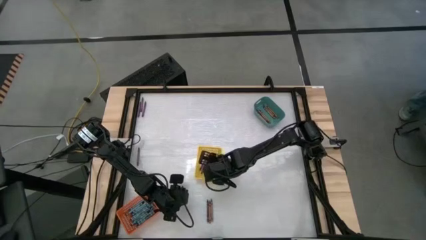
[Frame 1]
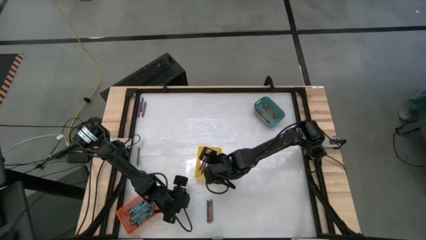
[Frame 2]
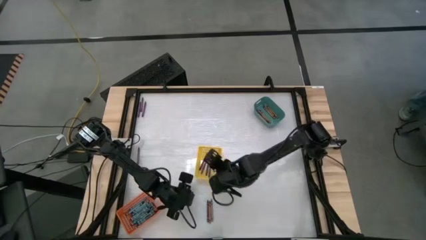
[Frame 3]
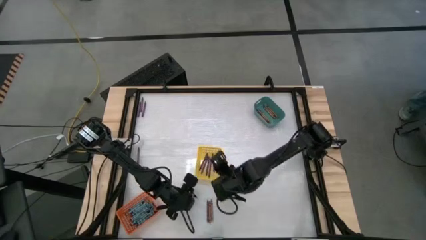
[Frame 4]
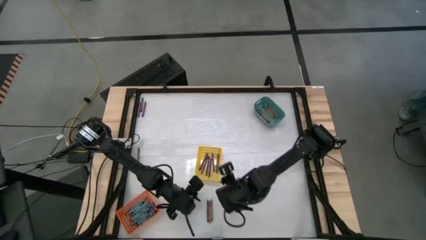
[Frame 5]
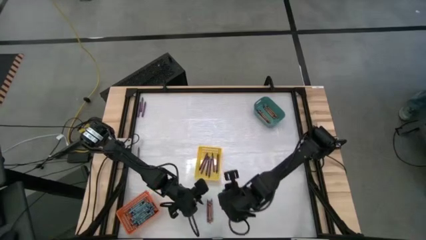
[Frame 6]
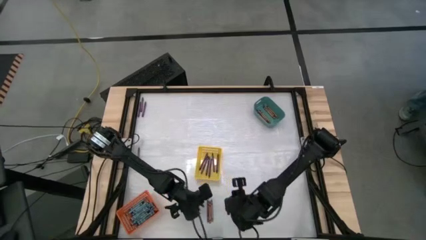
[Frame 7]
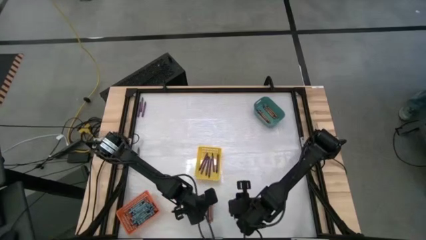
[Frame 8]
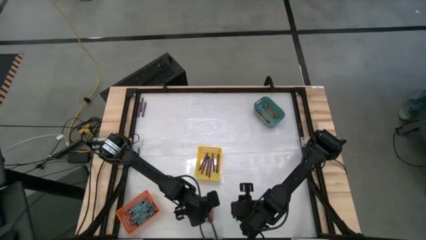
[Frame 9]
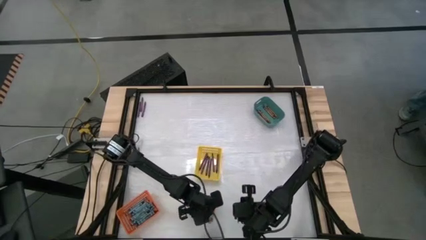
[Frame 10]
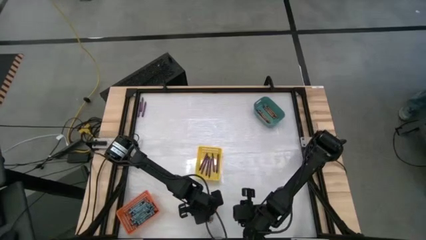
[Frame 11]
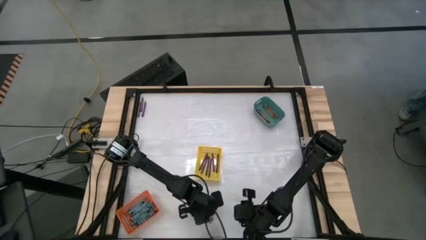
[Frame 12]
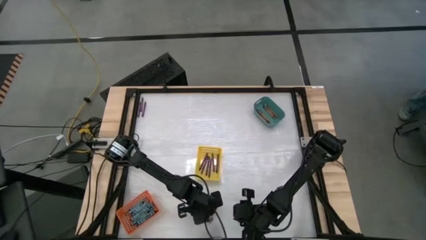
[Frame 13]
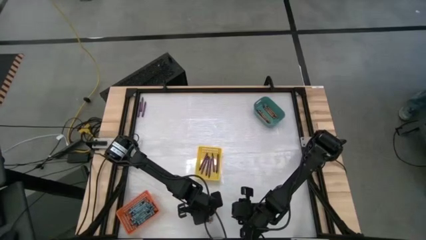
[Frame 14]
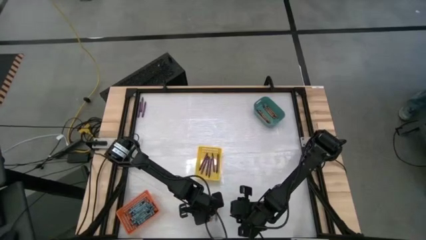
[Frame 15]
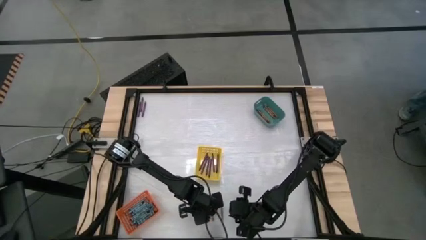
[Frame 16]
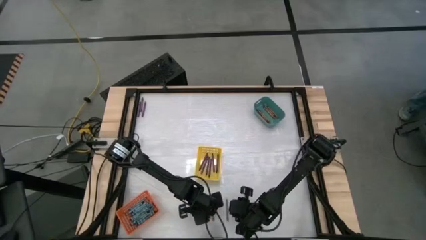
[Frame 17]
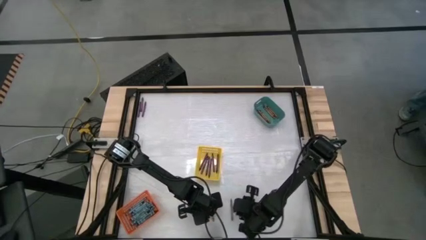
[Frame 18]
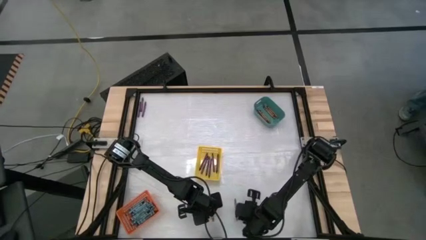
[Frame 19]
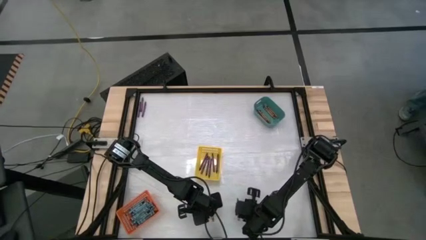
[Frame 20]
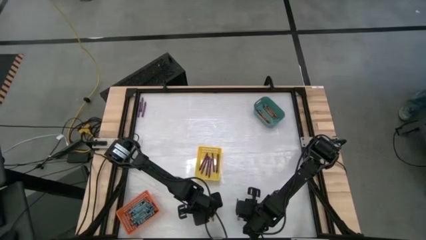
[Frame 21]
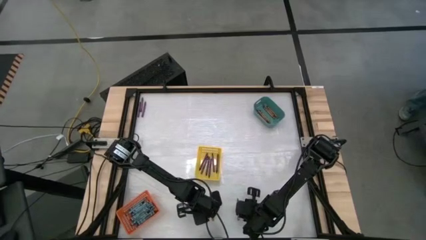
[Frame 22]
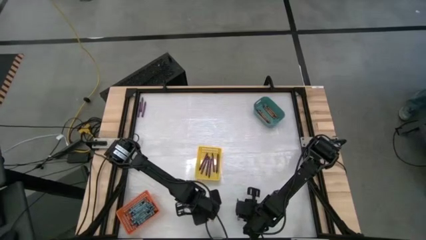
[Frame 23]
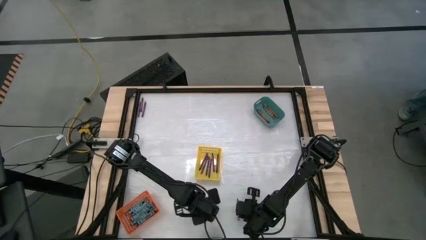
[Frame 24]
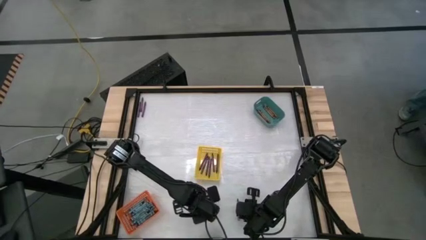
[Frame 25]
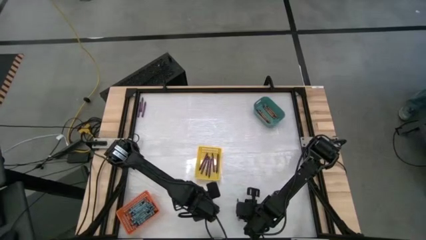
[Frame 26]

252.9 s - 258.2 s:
Task: Sort crayons
Put the violet crayon into the yellow basket

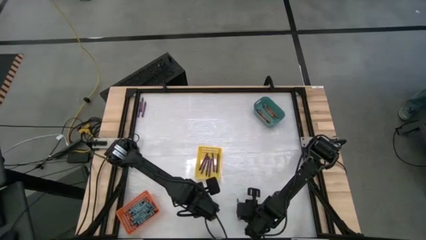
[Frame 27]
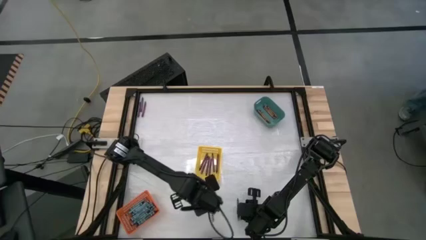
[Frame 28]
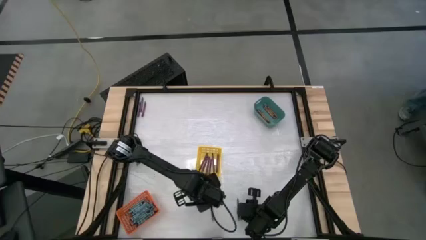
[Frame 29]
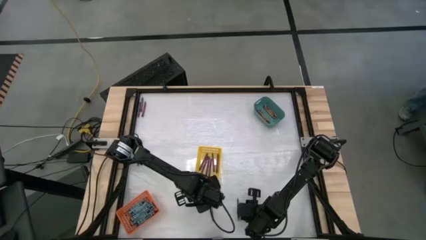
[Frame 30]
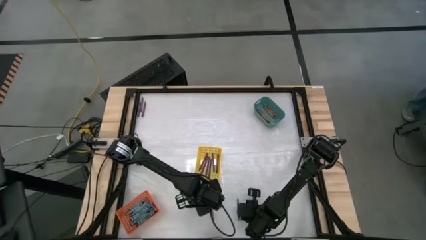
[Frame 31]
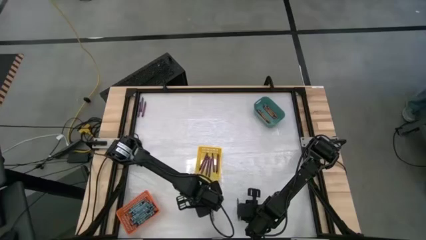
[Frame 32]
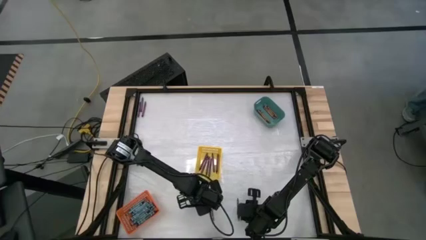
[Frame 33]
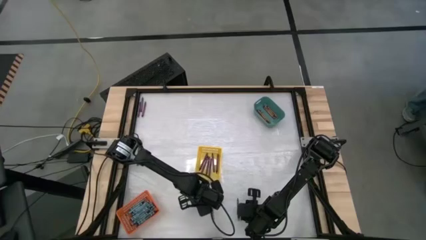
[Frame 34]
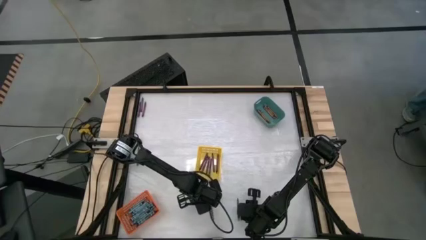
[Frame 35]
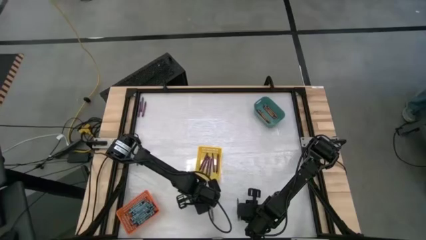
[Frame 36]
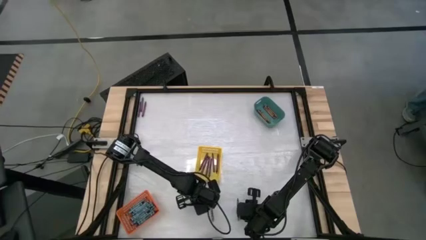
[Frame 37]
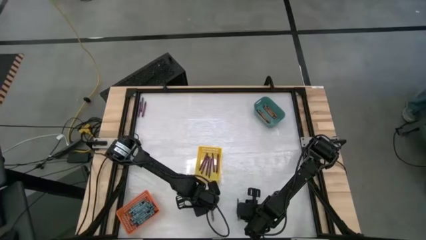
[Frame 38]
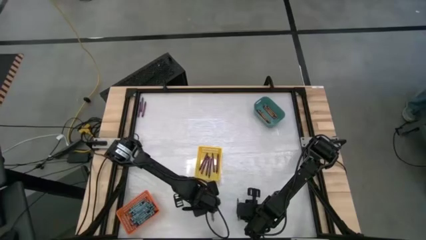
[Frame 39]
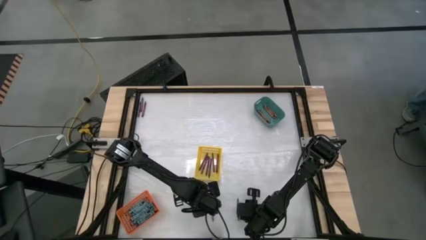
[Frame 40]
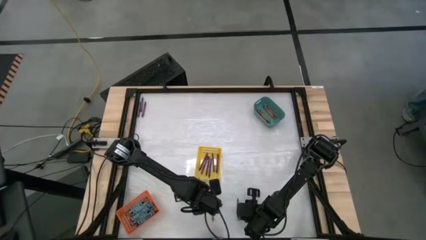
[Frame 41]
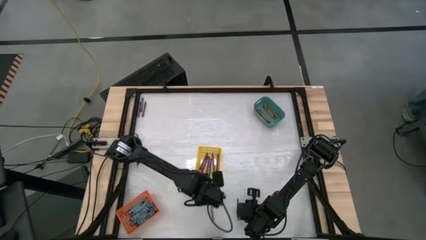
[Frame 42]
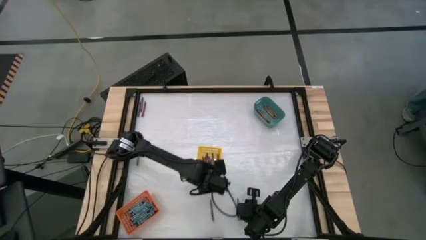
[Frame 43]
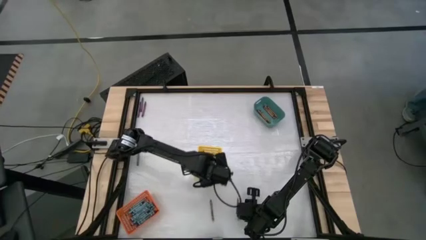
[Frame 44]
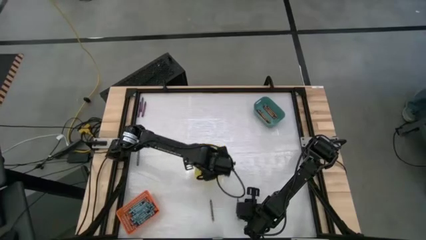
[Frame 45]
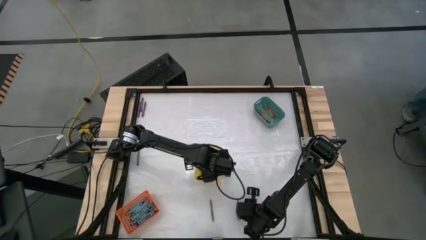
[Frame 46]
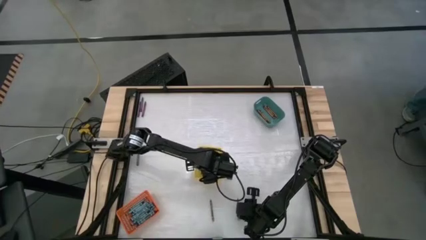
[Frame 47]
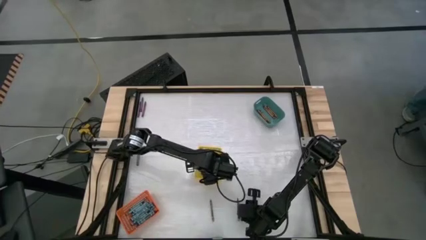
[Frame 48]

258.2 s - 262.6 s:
Put the violet crayon into the yellow basket

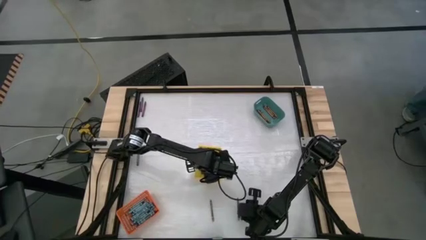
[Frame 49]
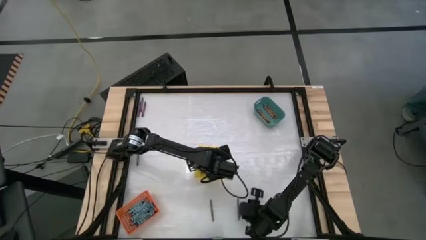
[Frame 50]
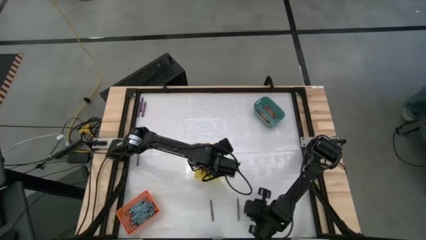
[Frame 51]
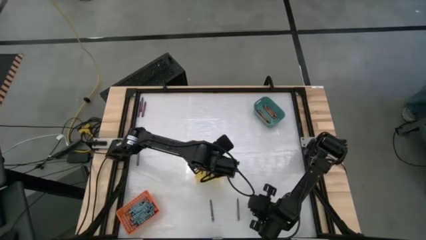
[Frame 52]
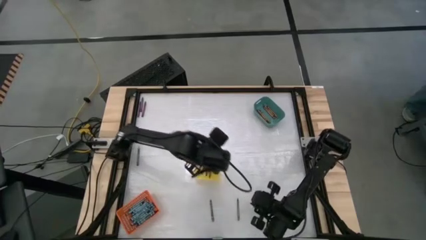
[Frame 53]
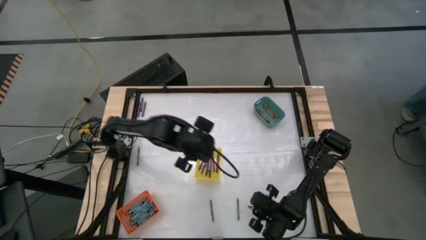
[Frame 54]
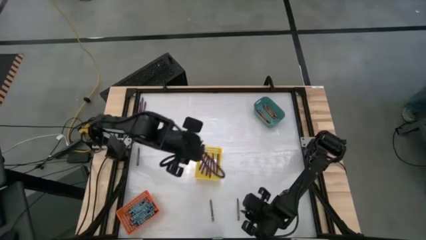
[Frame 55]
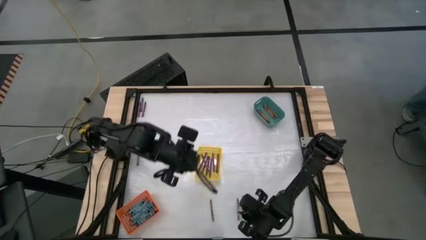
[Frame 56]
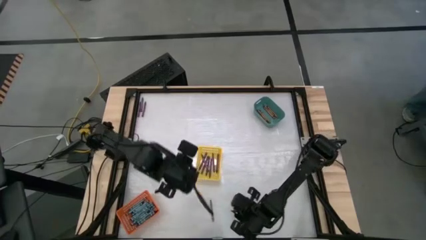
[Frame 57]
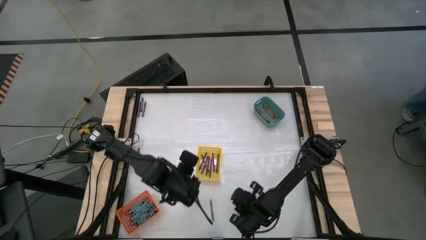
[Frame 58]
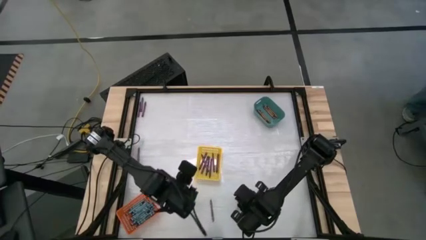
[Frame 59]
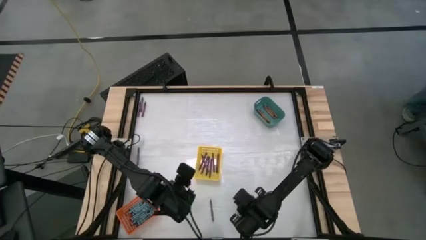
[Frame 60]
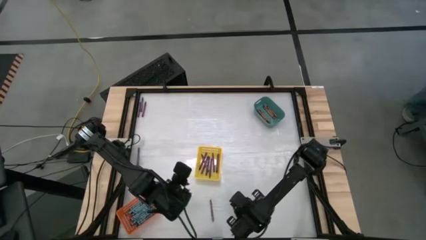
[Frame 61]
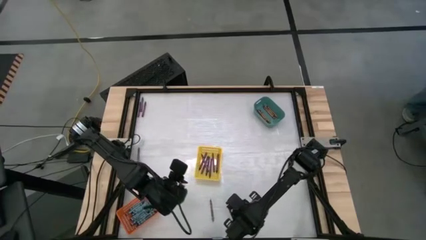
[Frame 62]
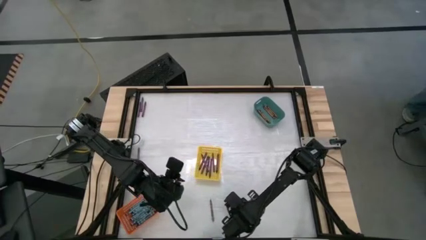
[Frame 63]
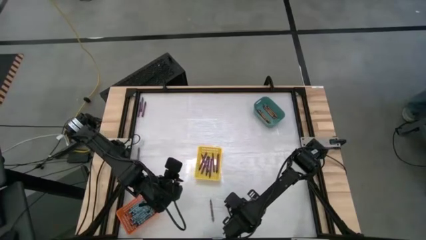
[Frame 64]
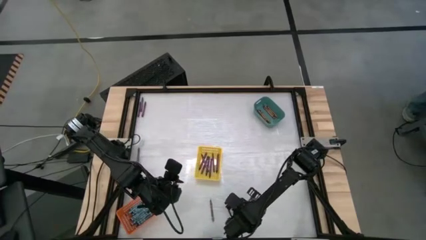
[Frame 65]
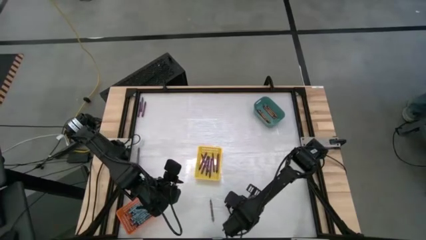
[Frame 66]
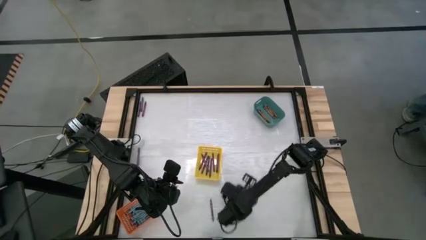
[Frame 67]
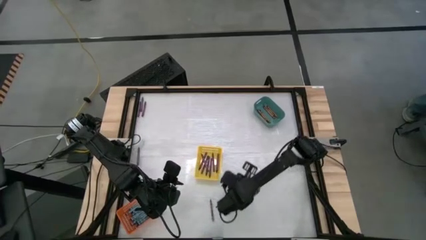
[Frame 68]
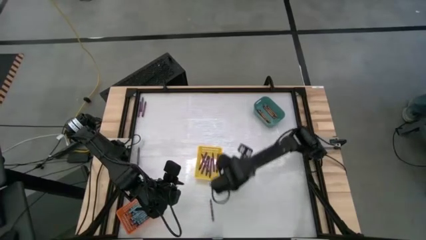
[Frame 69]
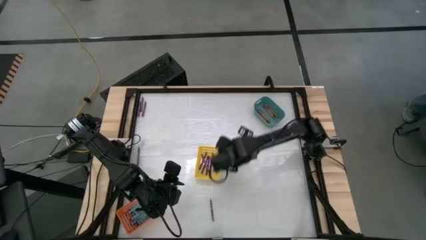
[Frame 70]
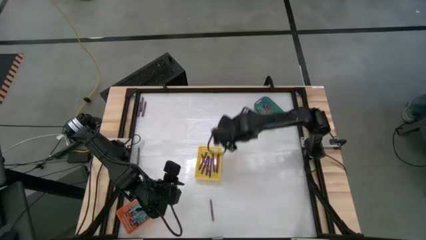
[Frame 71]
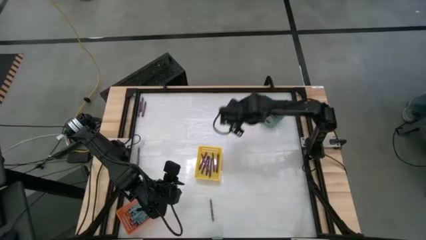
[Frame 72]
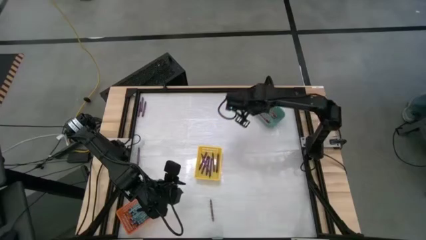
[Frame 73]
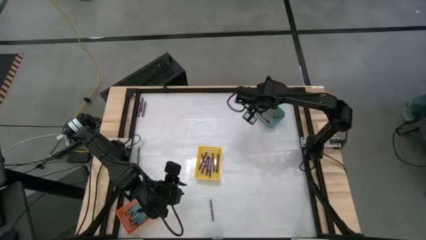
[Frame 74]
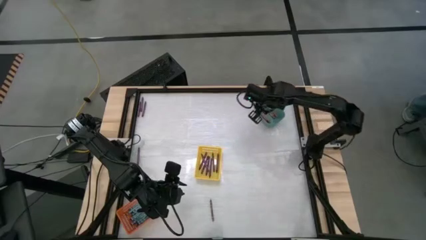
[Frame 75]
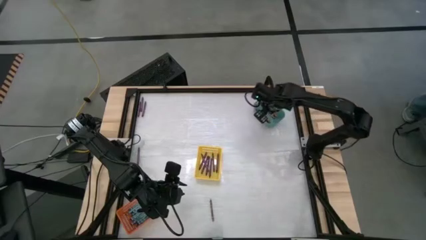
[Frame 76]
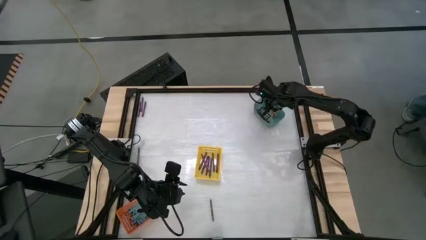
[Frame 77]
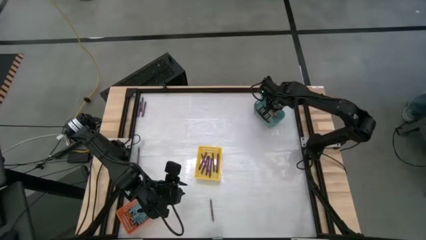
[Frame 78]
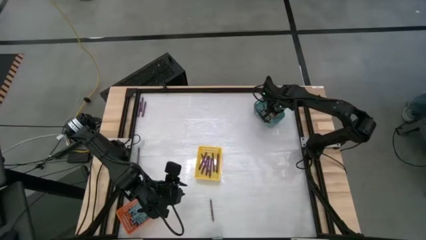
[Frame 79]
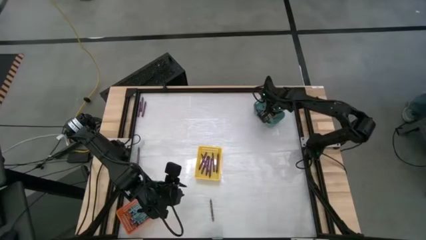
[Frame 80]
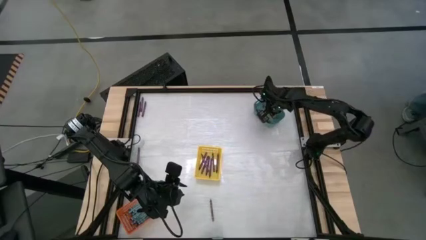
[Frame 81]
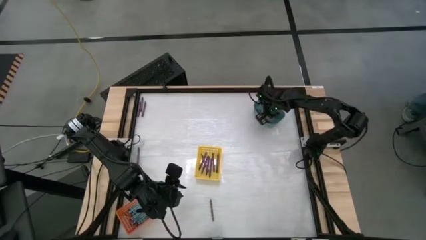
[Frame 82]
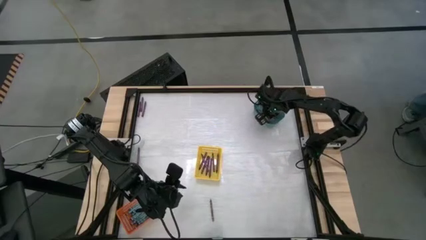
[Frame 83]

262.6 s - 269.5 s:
Put the brown crayon into the green bin
